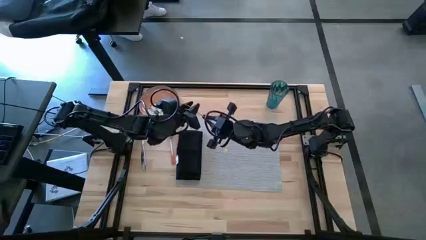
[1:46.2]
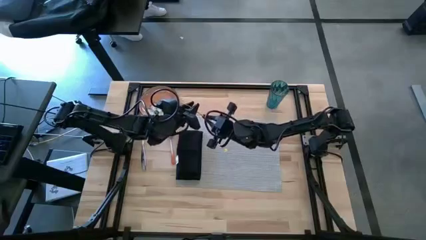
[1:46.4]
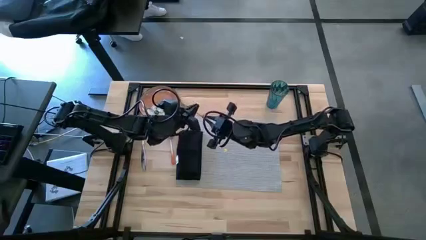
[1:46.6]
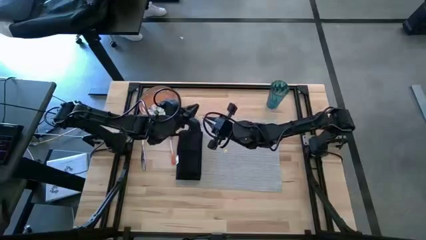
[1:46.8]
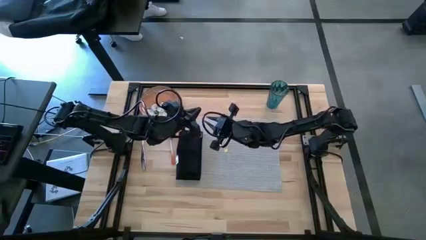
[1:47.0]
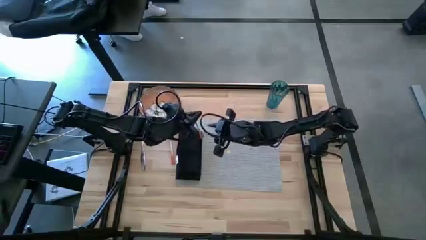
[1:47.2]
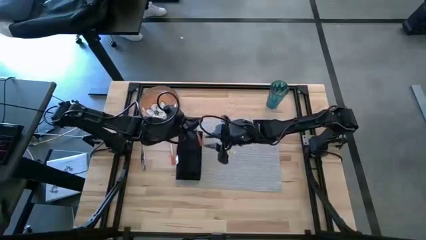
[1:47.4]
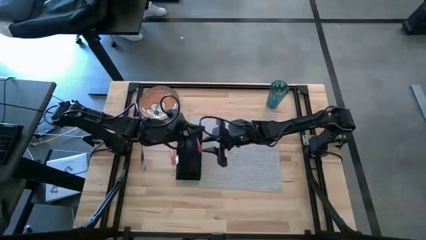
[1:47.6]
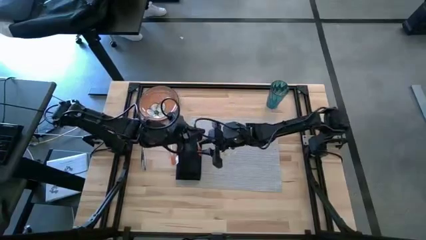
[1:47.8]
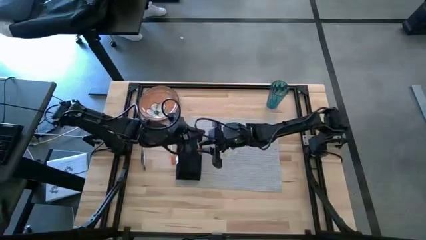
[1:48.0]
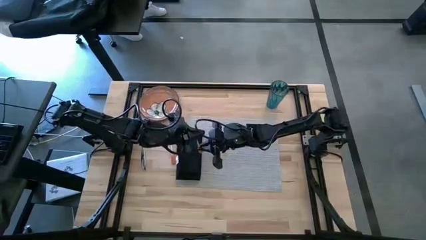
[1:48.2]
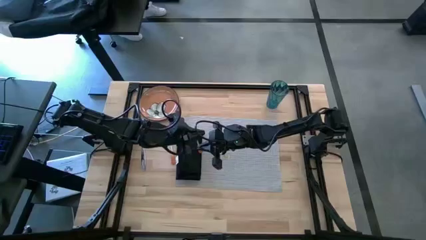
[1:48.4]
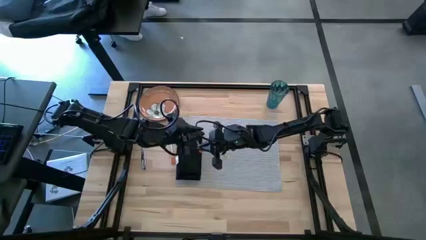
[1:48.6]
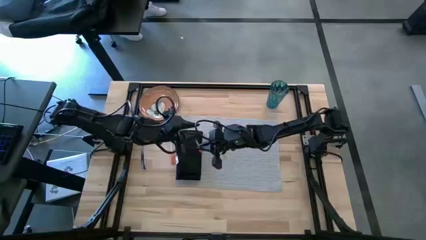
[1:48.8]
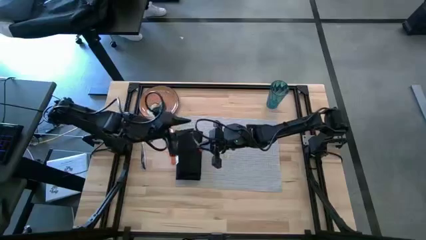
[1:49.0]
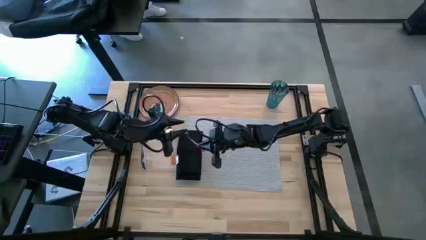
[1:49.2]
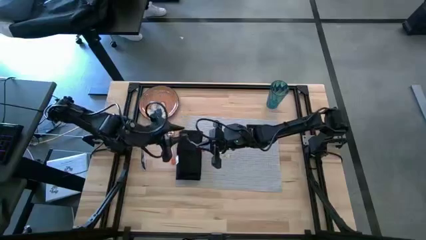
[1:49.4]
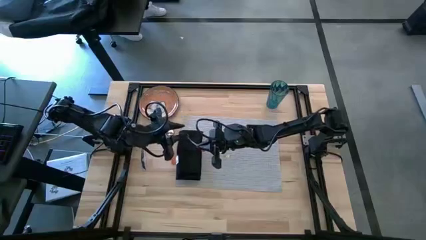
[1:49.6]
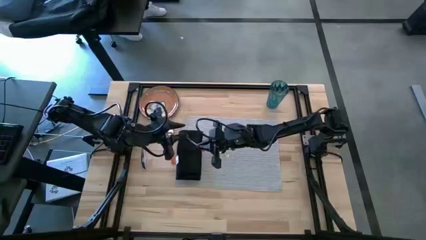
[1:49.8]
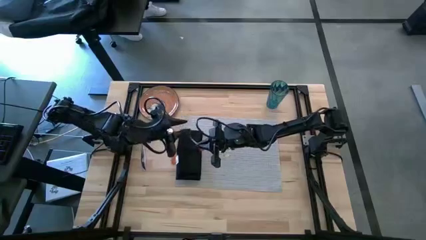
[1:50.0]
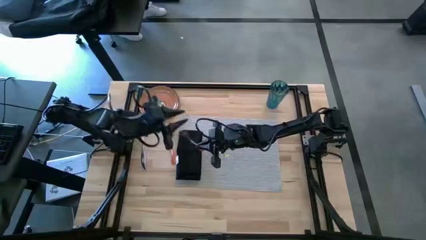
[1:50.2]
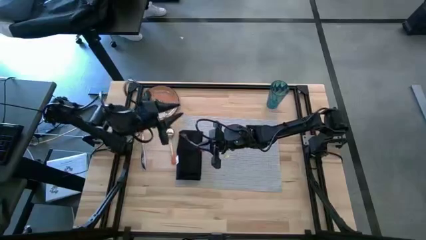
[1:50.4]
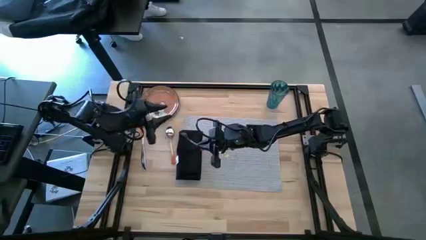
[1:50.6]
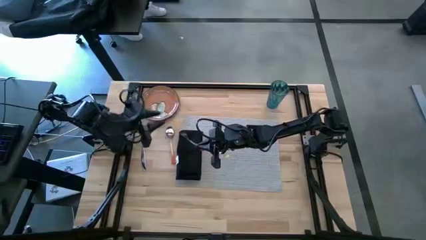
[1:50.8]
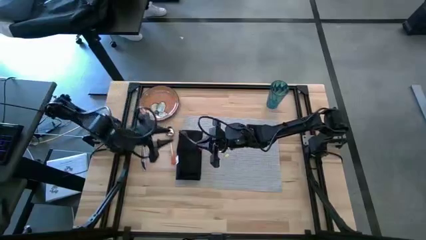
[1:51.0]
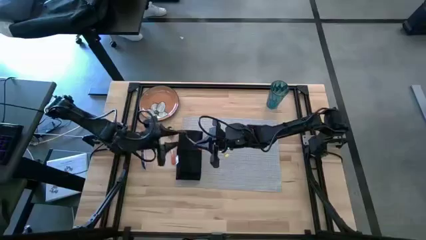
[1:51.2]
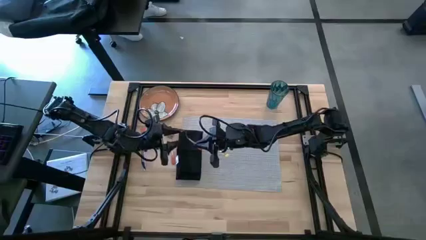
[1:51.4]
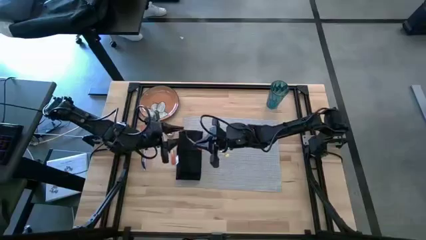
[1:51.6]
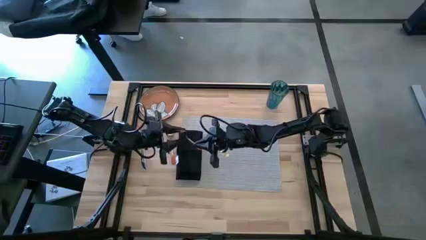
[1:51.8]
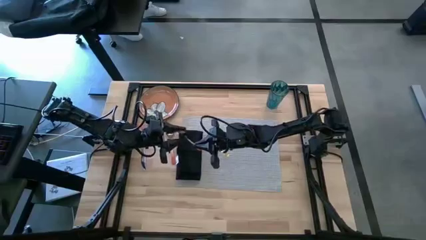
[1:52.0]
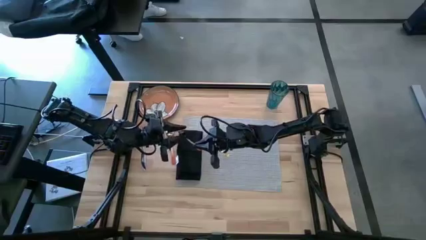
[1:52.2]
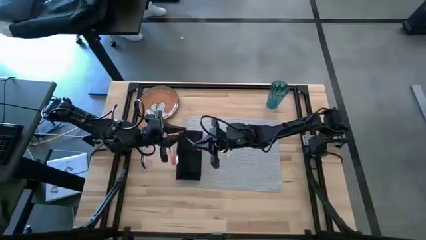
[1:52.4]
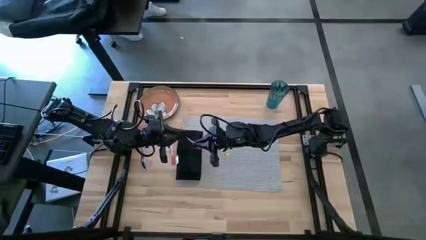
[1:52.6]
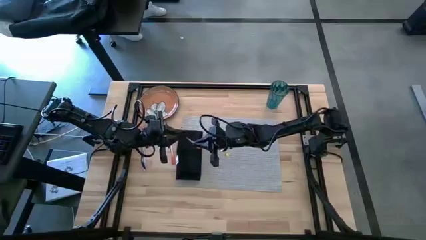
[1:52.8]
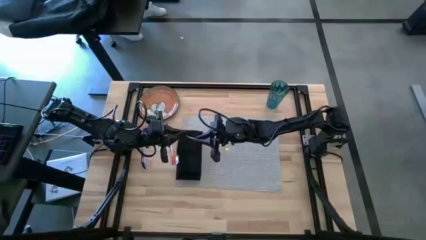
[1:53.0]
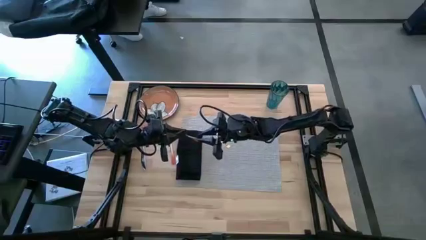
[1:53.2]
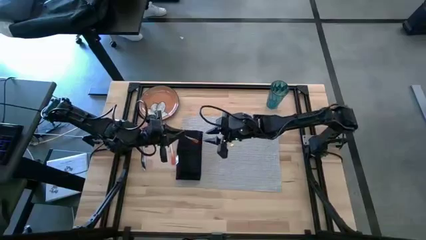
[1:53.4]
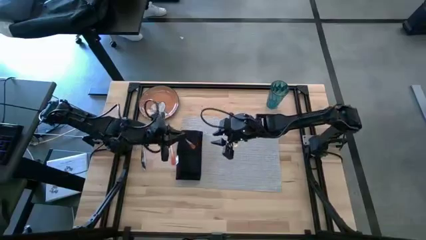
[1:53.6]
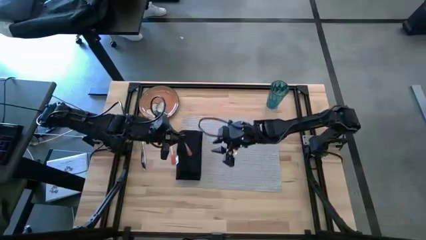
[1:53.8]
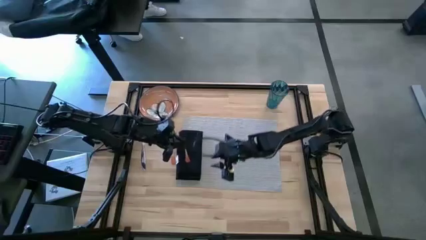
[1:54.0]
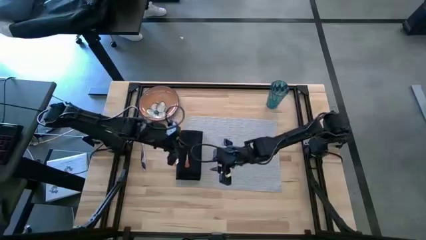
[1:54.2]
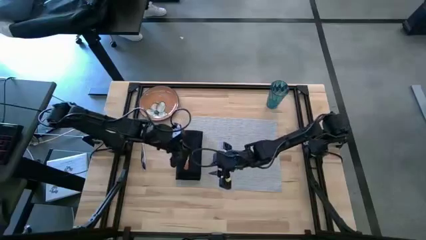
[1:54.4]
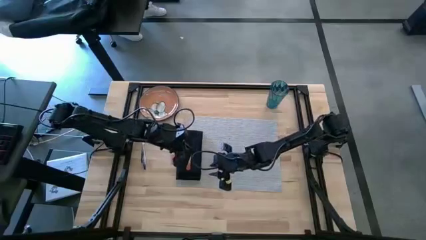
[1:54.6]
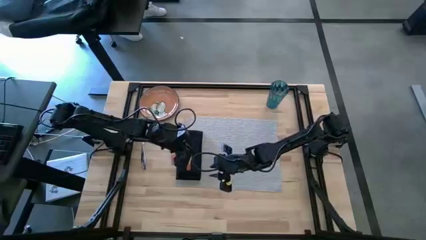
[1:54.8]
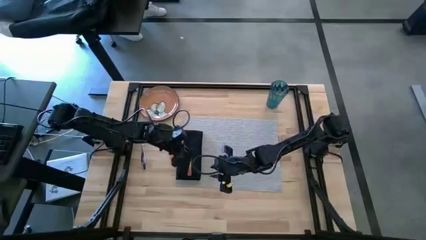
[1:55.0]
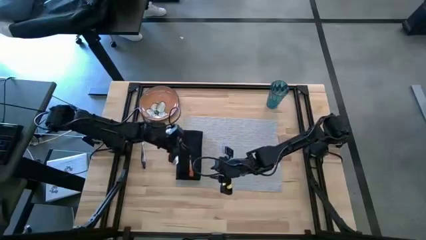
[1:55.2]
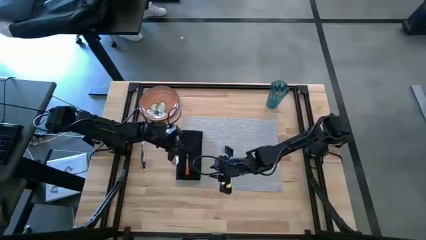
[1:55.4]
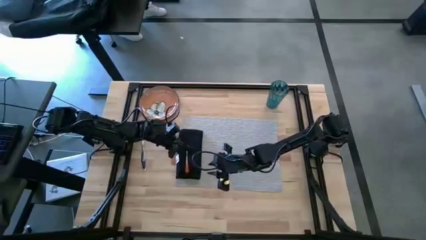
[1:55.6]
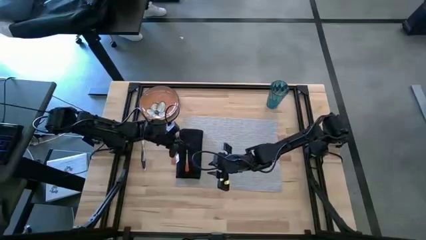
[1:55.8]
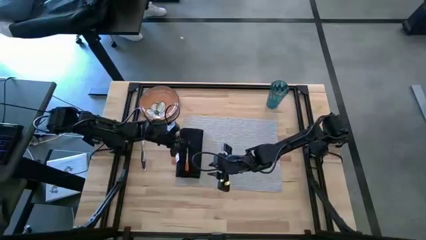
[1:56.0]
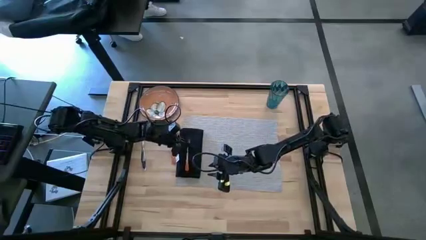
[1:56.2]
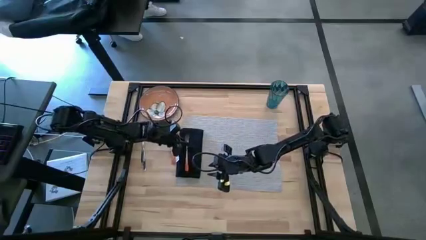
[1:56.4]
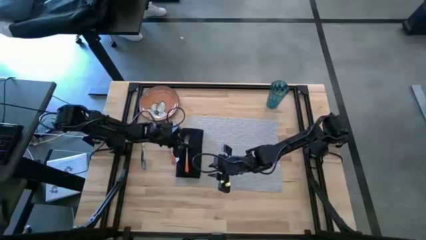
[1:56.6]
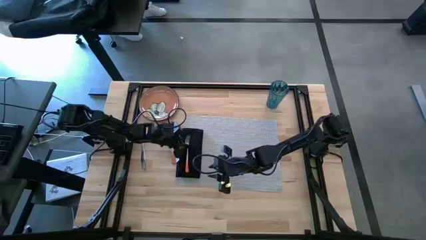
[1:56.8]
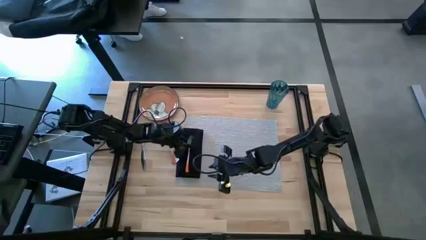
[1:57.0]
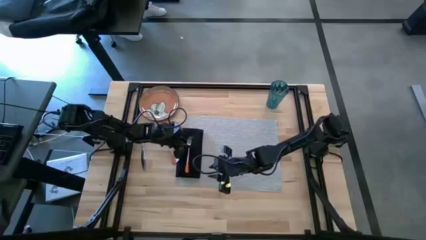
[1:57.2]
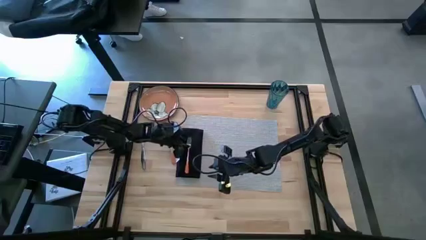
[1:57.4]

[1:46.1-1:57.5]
Task: Set table place
Put the orange fork on the top of the black table napkin

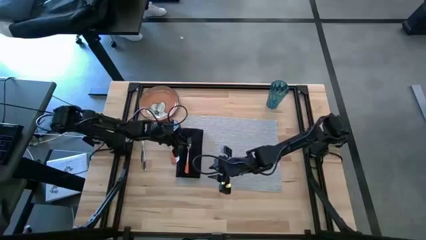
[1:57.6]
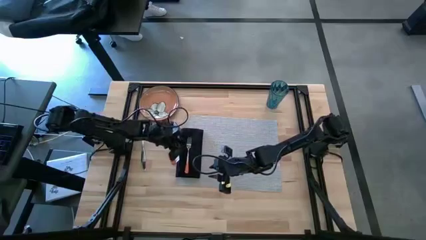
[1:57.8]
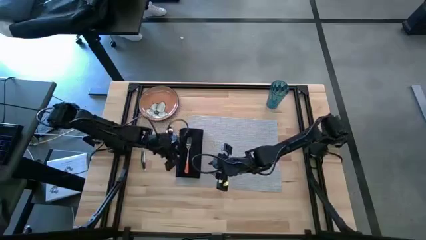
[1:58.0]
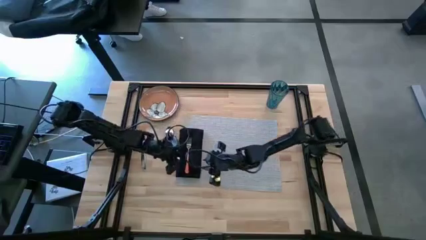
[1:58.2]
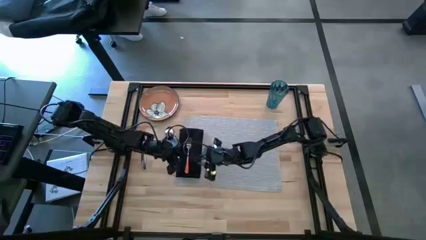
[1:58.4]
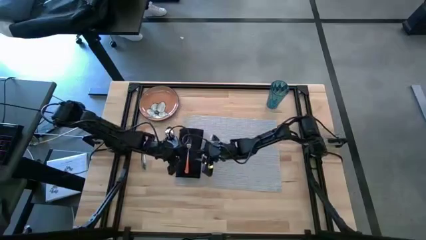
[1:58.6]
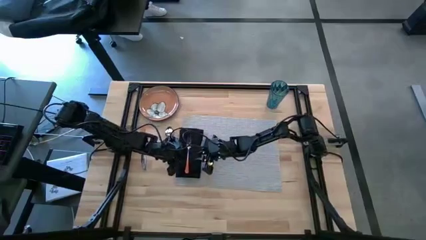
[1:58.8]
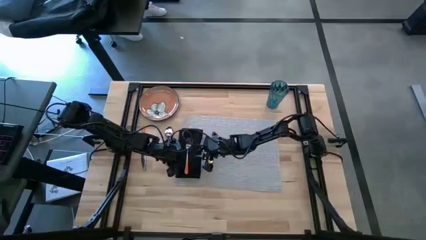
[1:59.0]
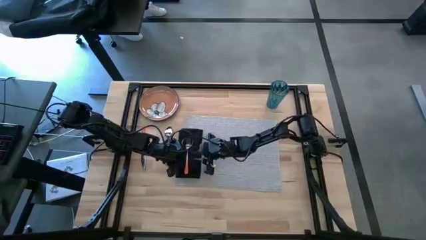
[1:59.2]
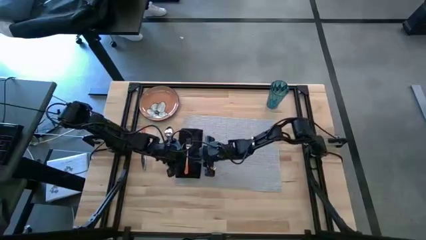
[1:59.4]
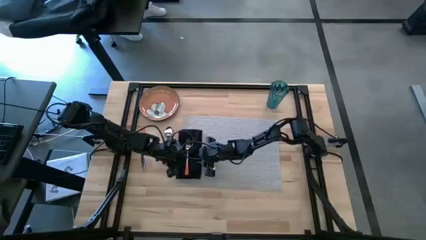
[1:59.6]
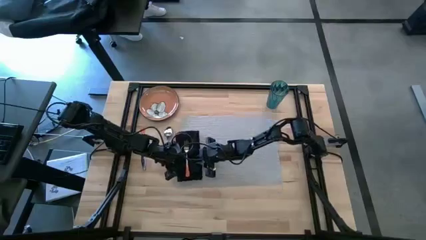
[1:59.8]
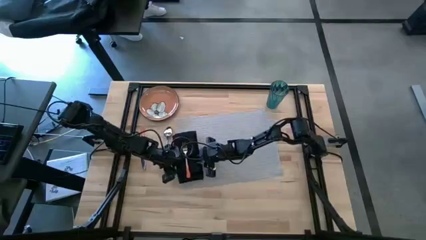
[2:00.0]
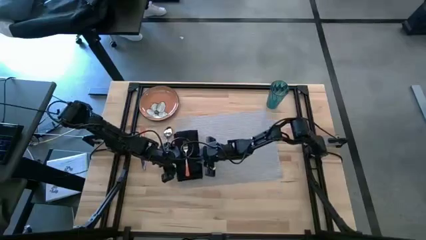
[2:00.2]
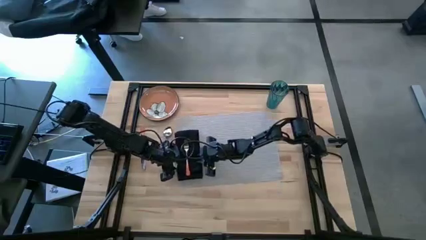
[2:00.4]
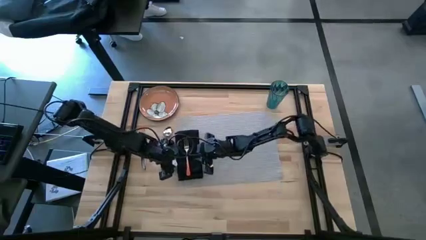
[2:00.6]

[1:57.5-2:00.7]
Adjust the black table napkin

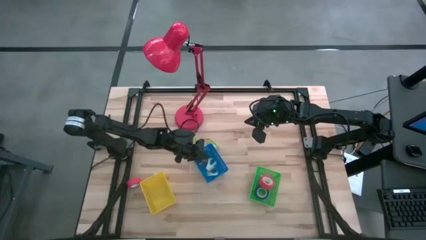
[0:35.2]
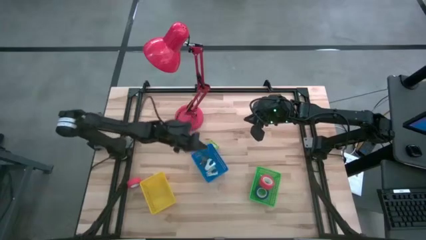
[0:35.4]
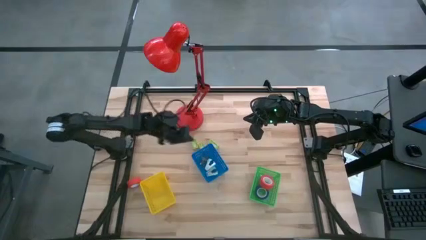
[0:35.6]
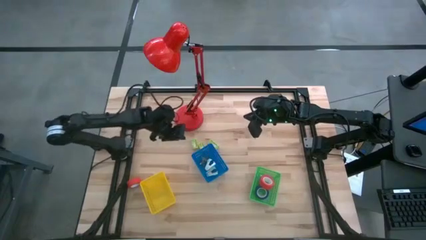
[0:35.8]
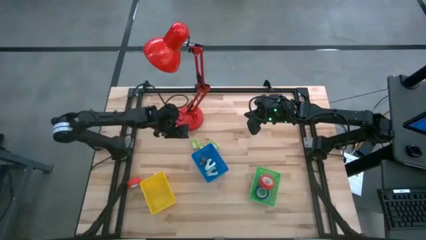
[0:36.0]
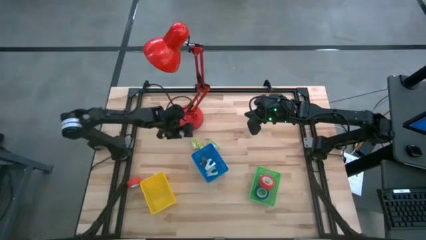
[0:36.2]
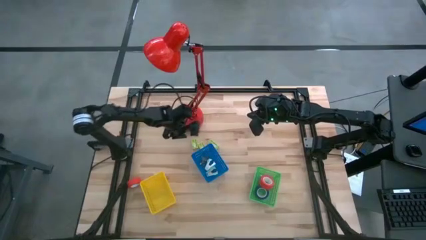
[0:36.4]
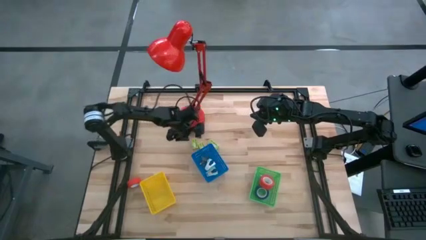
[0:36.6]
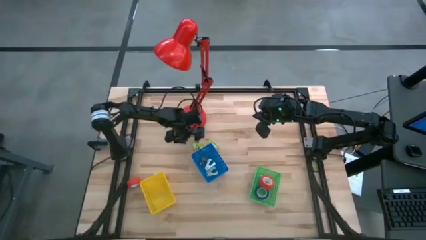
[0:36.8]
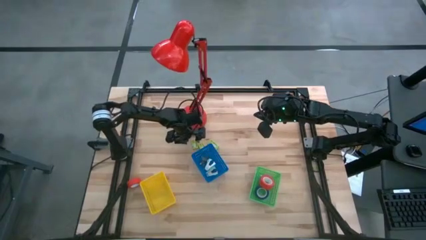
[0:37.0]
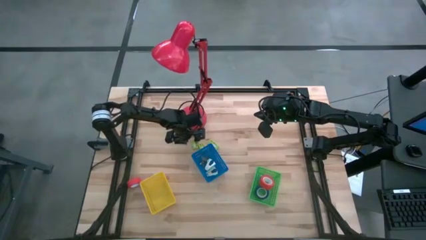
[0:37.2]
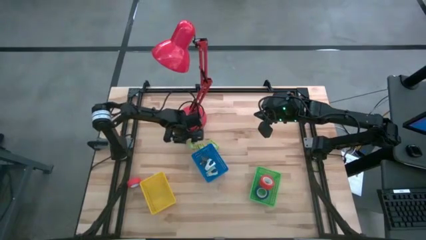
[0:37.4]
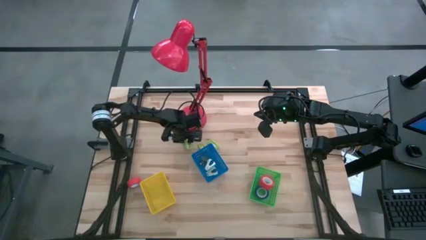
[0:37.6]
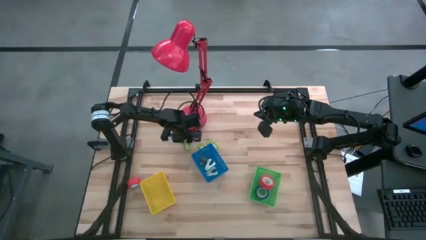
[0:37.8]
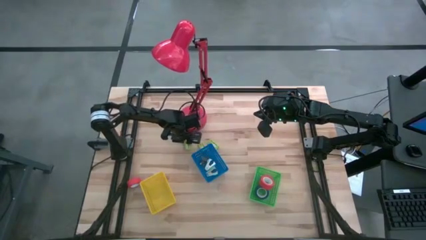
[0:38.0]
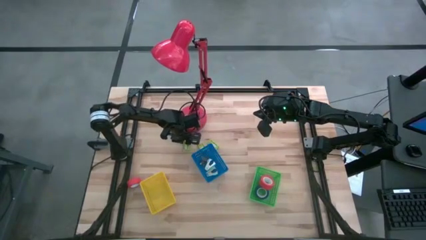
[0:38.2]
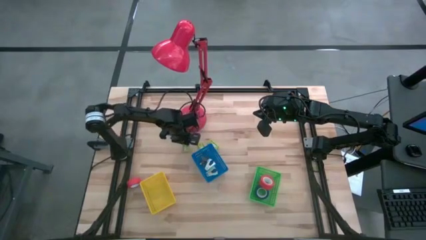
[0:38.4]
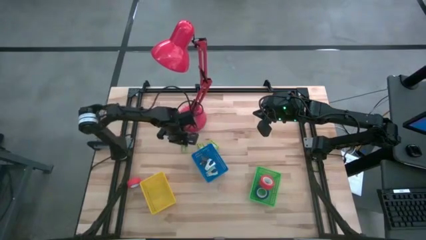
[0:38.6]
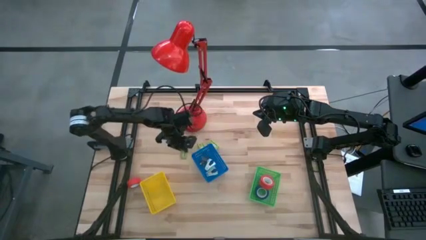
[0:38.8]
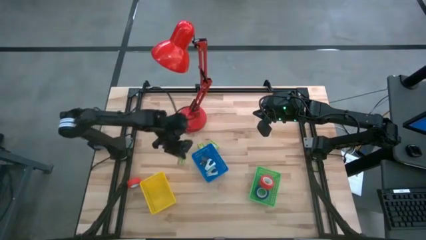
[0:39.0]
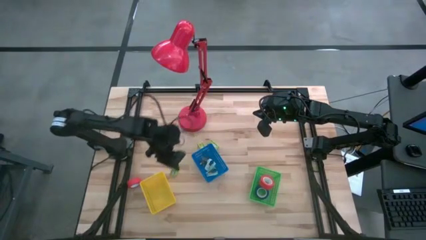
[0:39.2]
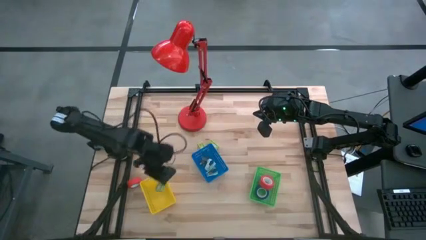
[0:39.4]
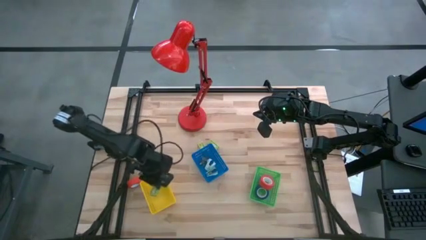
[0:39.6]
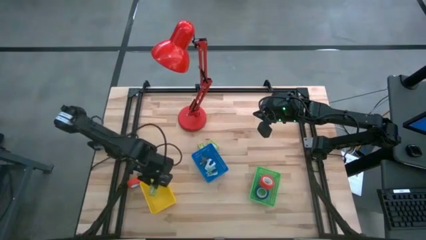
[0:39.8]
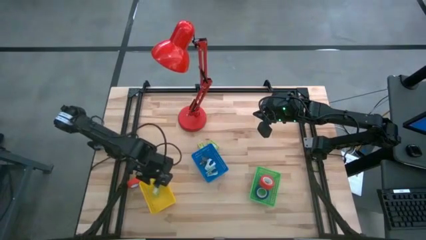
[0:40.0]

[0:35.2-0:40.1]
Task: Pick and place Stapler, Stapler remover, tape
Put the left green staple pin box into the yellow bin
